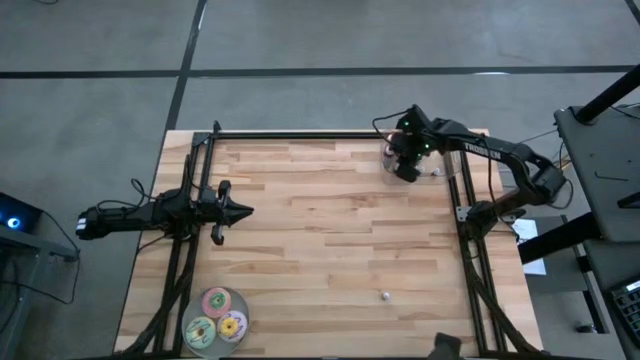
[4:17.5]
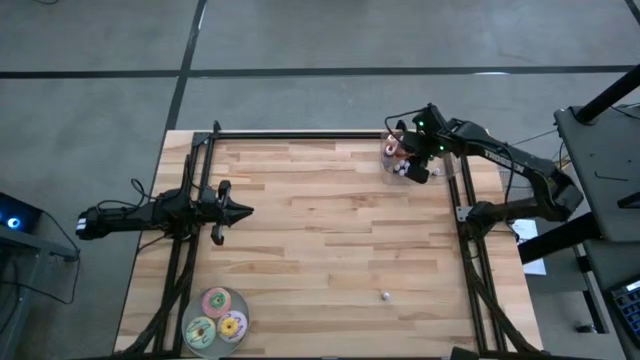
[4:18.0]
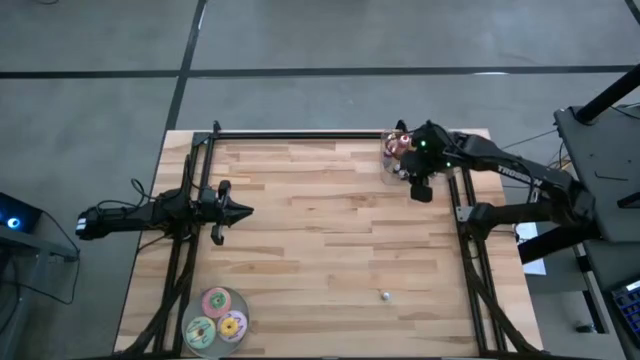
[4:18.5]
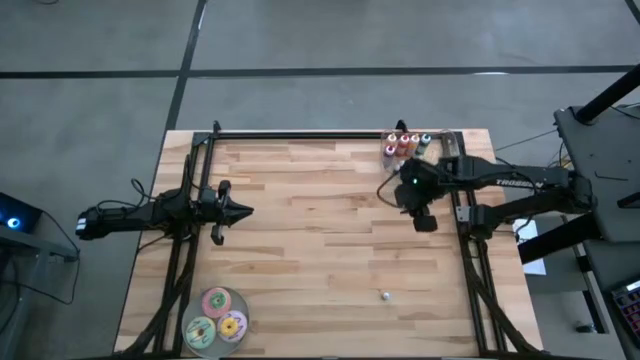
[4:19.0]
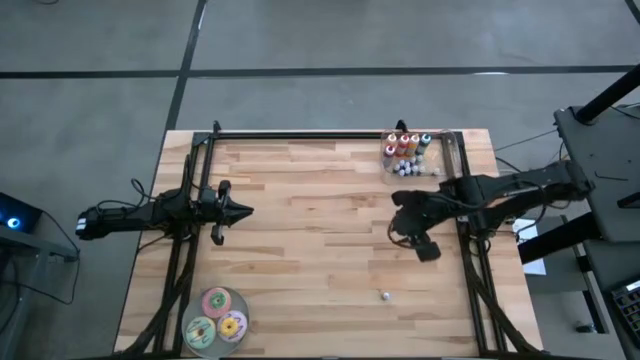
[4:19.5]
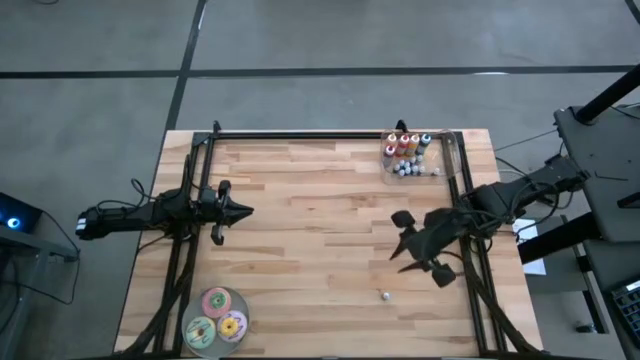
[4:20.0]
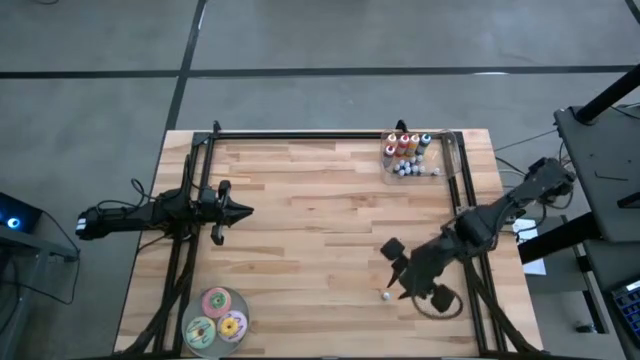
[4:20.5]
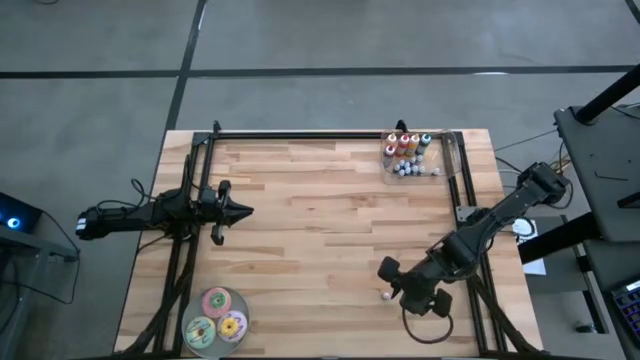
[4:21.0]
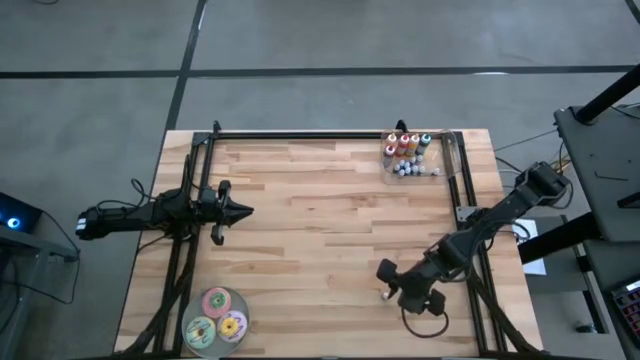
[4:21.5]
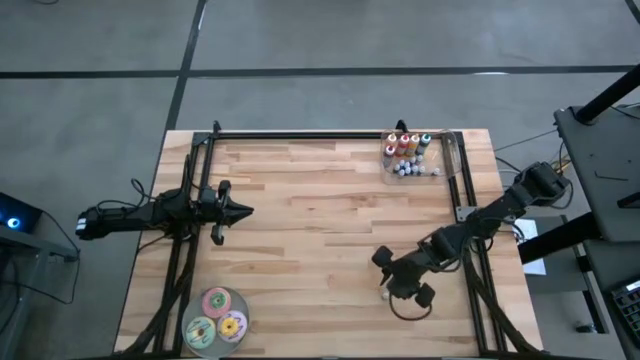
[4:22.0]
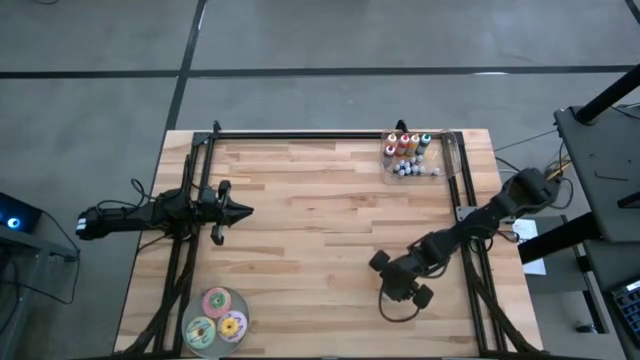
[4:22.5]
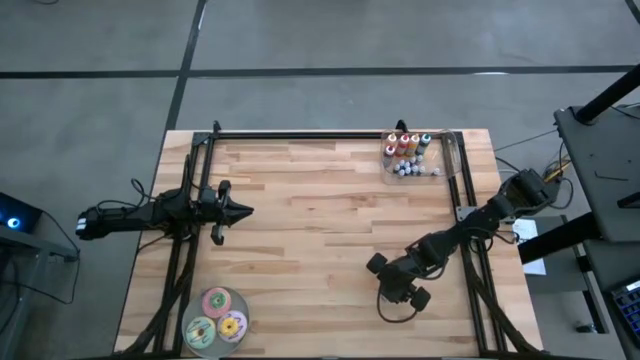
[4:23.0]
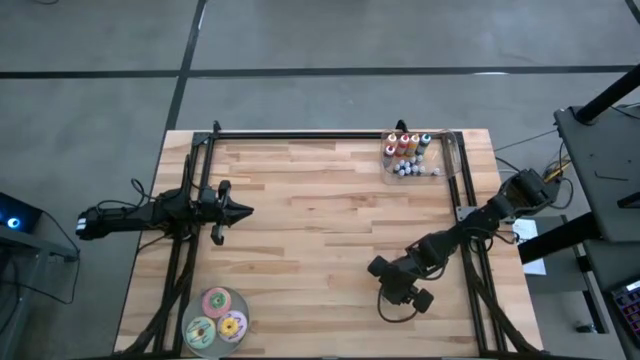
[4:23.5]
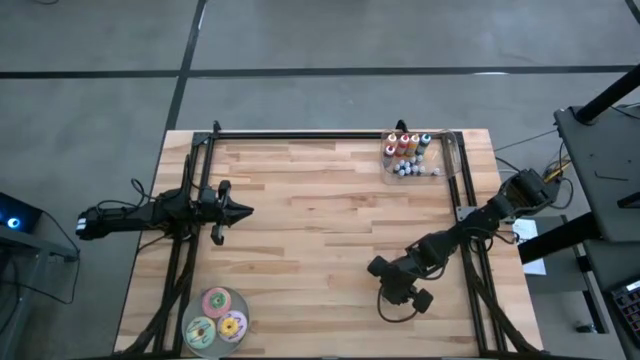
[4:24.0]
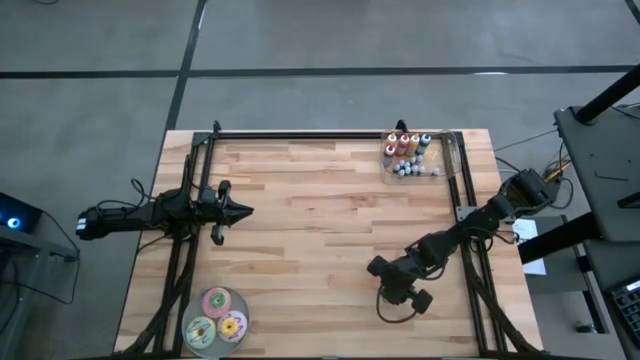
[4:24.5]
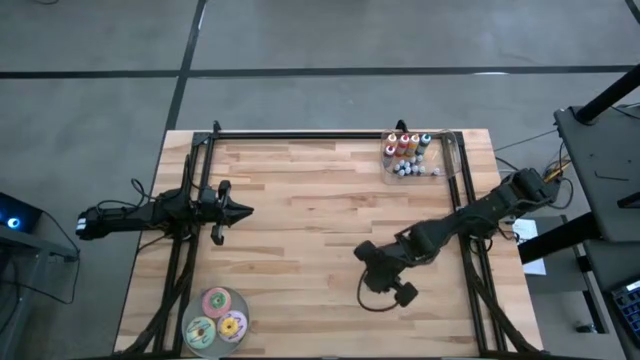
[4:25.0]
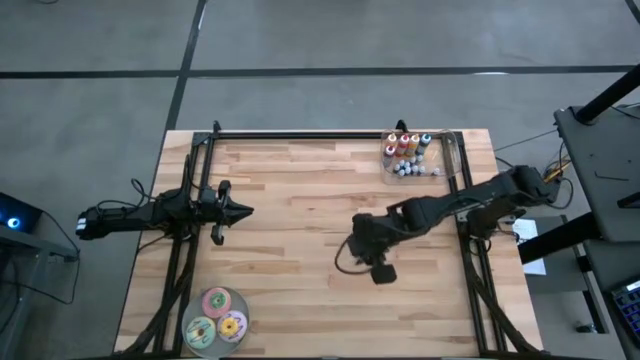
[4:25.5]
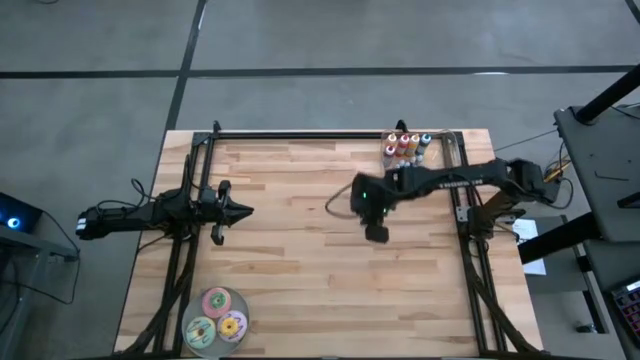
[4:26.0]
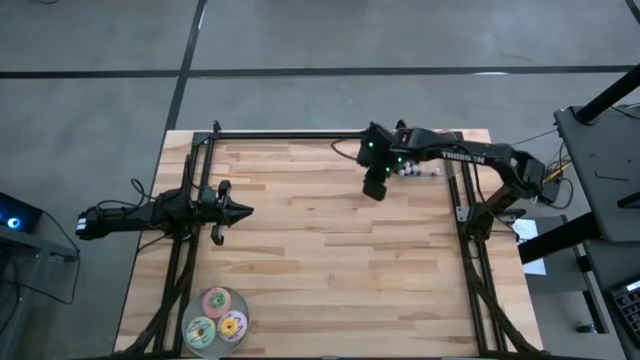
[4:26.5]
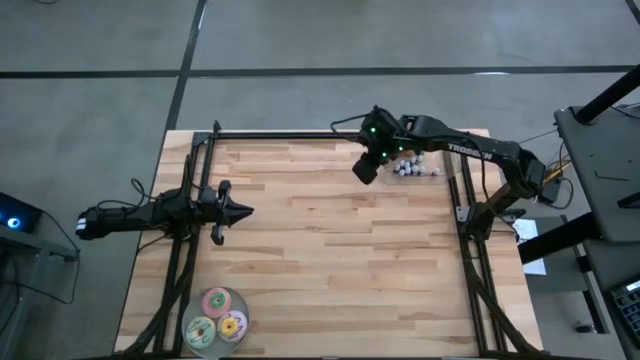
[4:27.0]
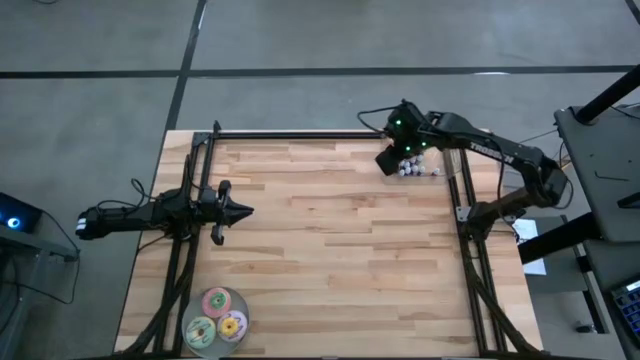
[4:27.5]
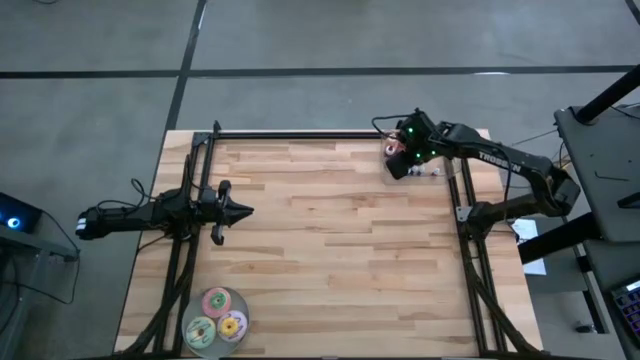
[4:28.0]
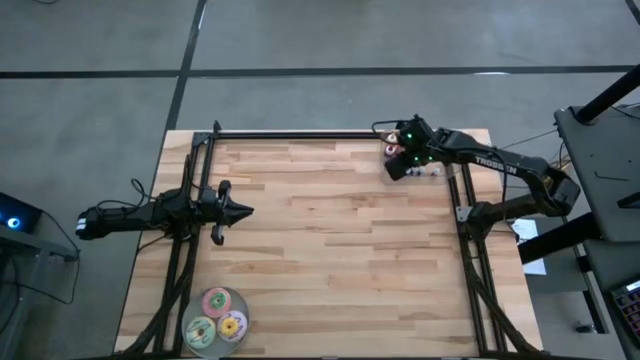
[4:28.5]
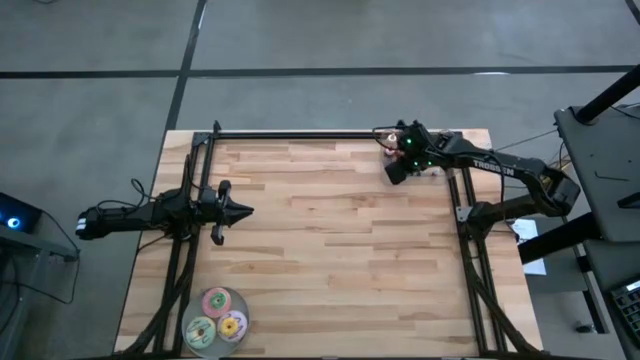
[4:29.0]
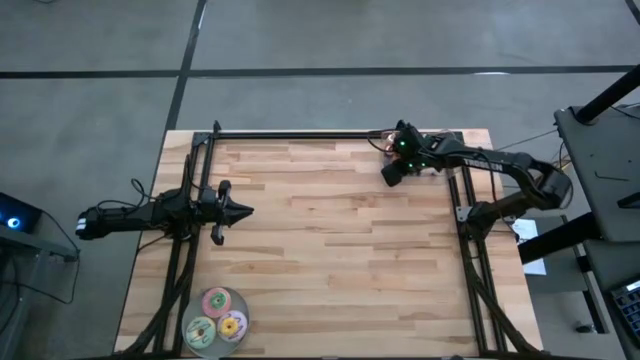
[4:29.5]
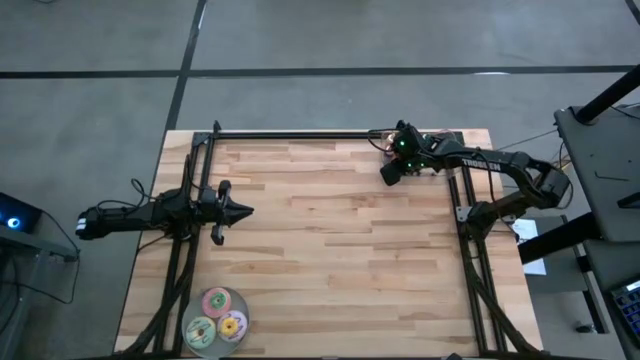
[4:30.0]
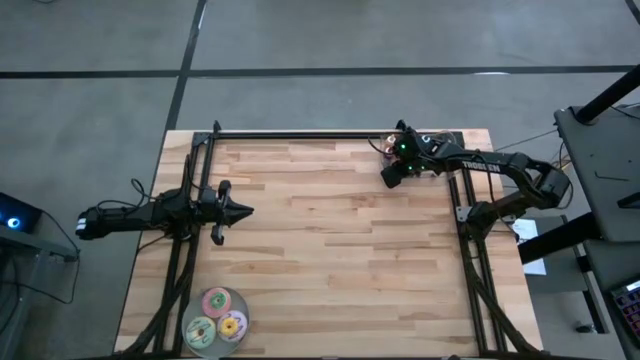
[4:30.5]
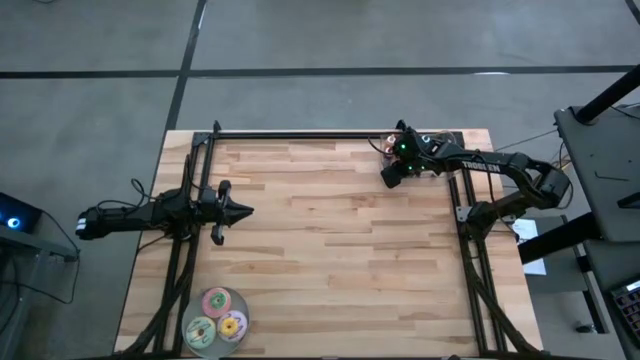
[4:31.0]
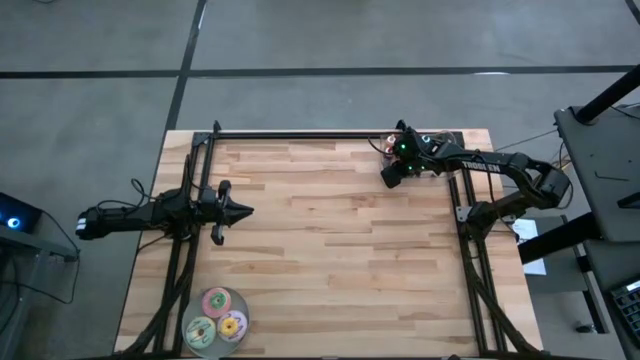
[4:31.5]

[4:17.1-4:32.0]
Task: Pick & Place food coloring
Put small red food coloring bottle into the bin

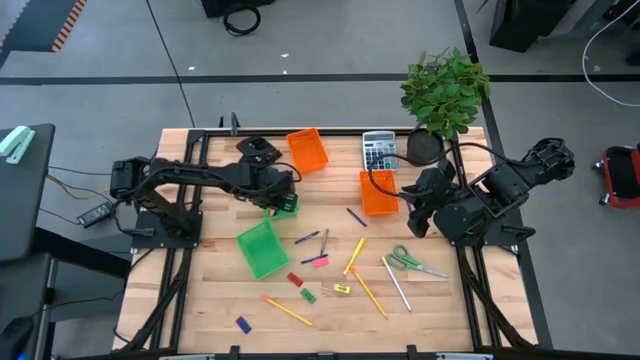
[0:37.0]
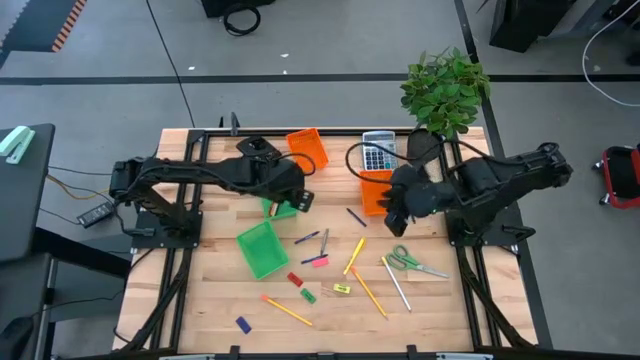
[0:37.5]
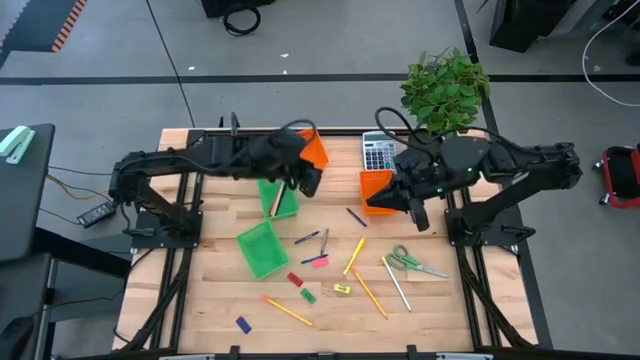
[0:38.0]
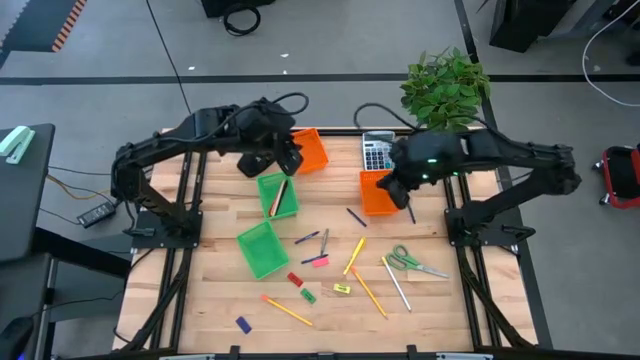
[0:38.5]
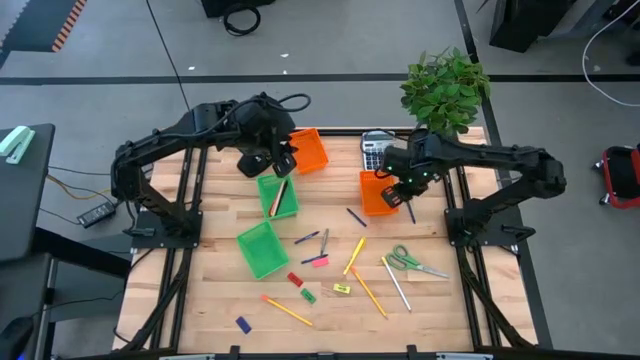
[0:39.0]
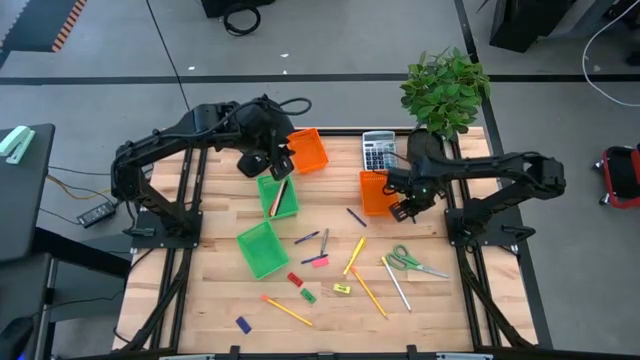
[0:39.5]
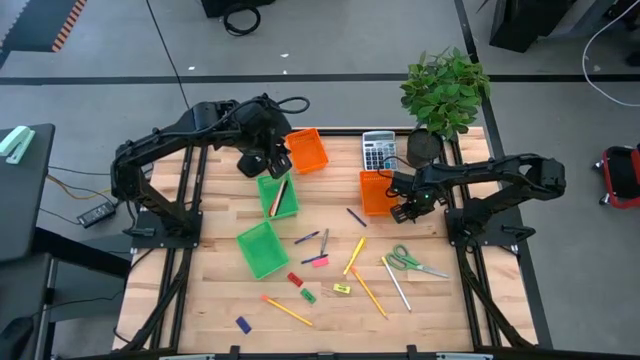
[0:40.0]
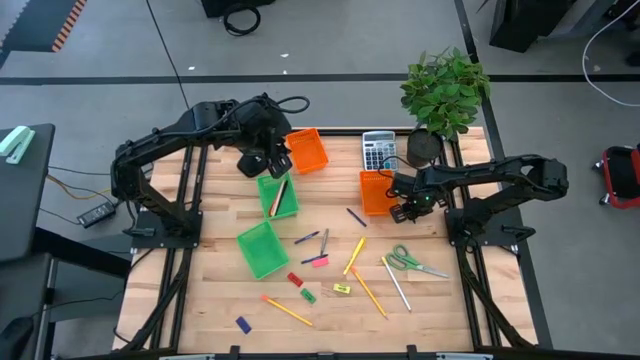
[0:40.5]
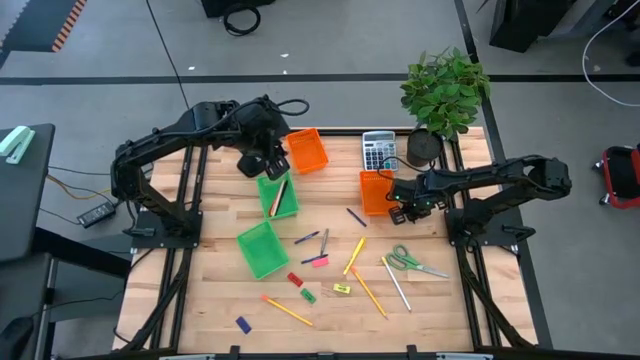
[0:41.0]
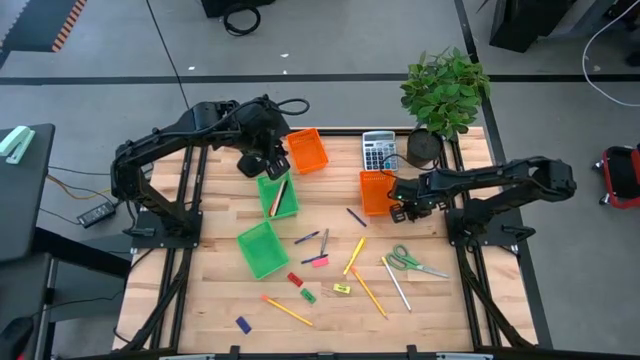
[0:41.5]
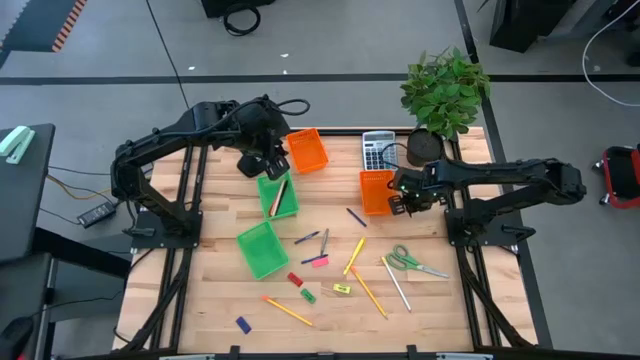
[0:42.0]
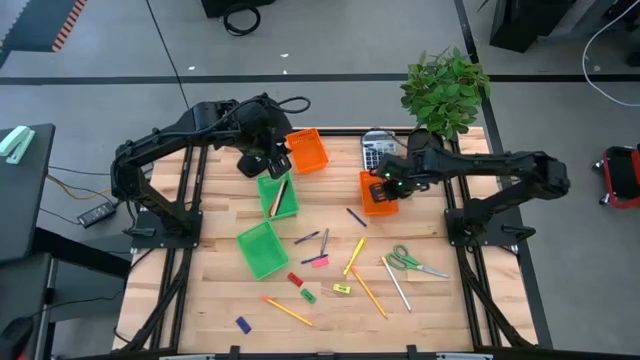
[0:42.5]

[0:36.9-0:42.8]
Task: Sort crayons/erasers/pens/pencils in bins
Put the top right blue crayon into the bottom orange bin
